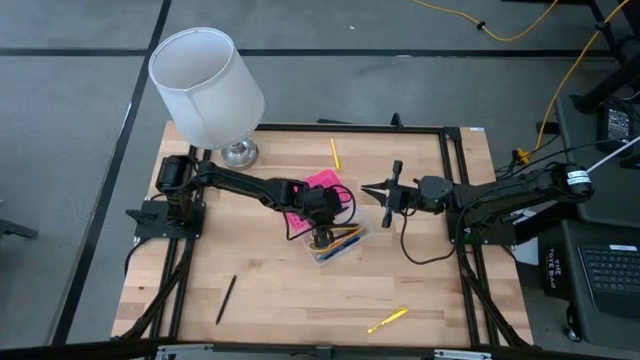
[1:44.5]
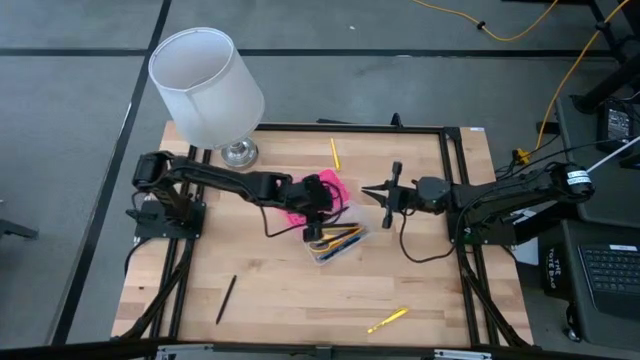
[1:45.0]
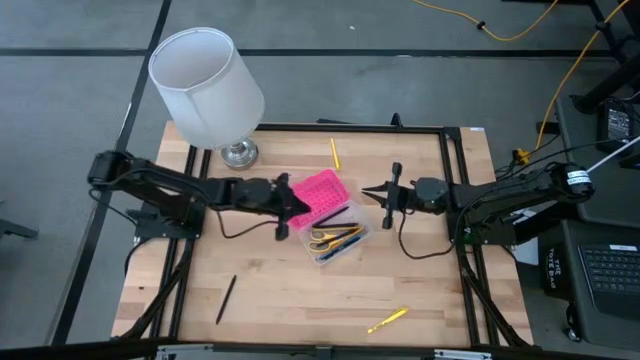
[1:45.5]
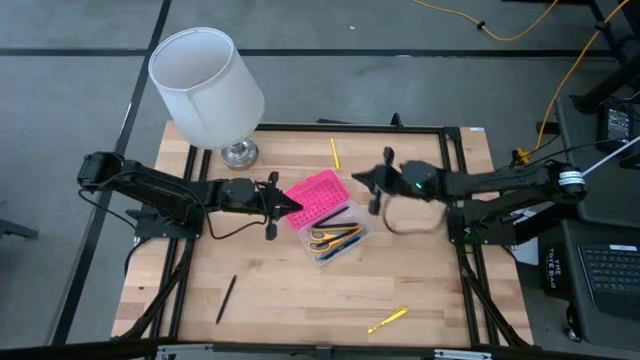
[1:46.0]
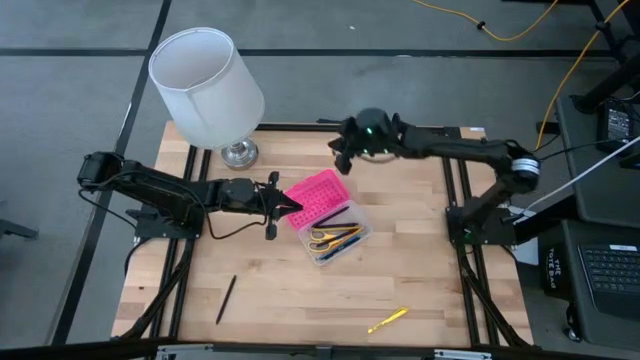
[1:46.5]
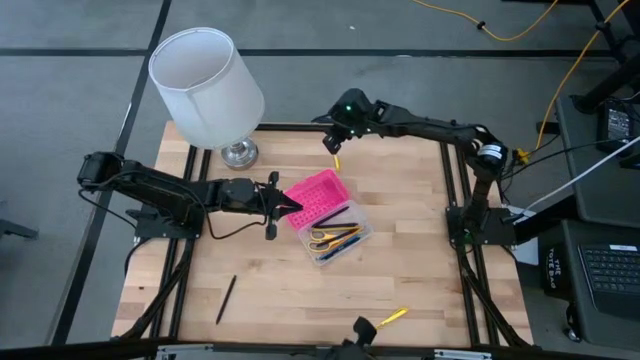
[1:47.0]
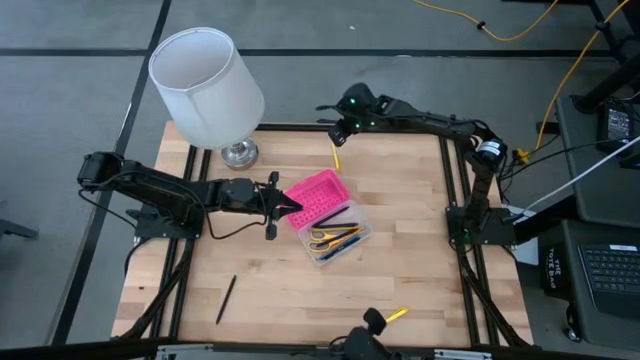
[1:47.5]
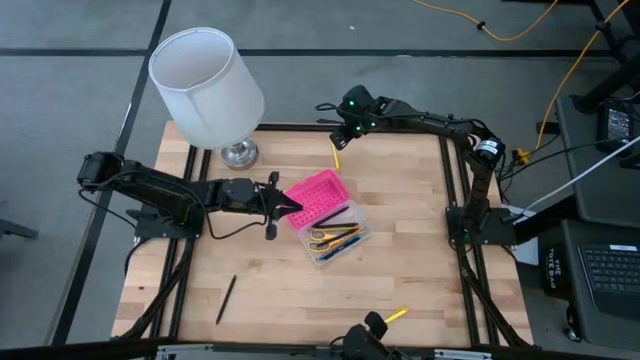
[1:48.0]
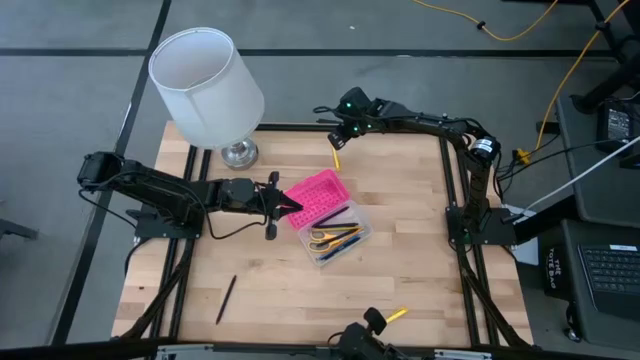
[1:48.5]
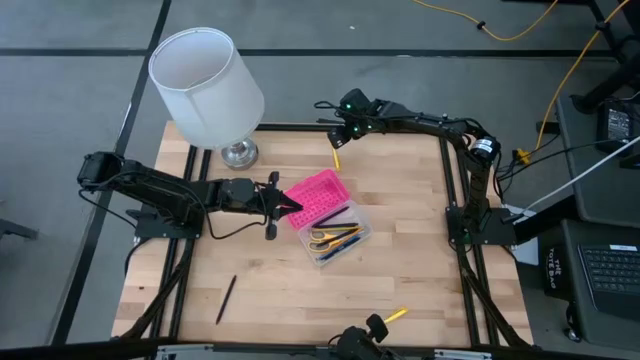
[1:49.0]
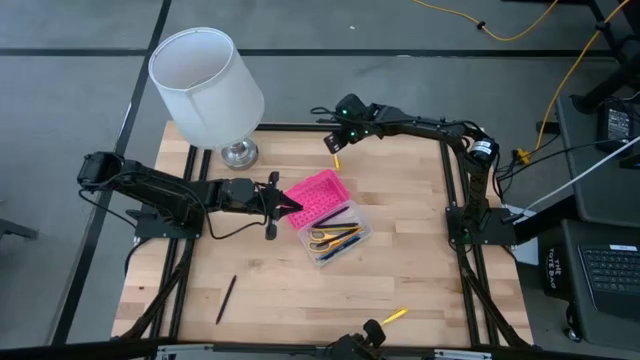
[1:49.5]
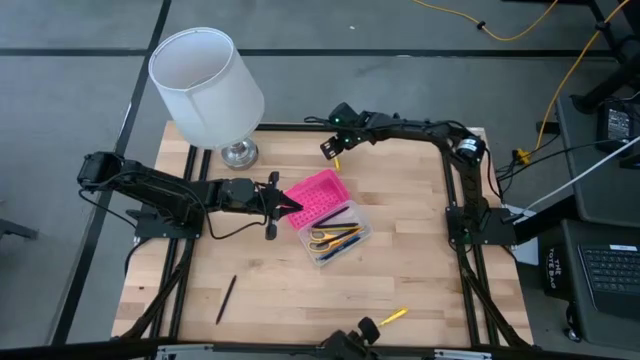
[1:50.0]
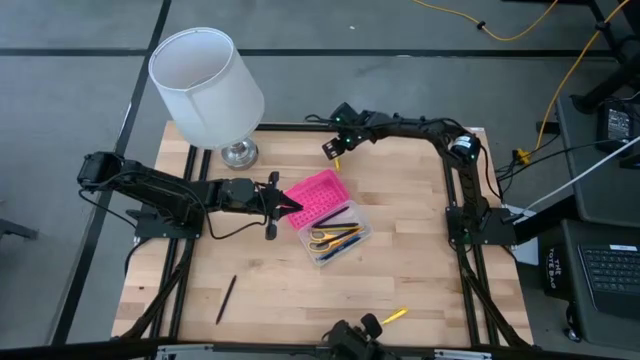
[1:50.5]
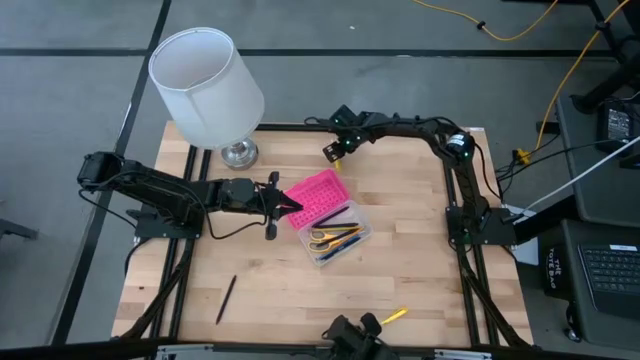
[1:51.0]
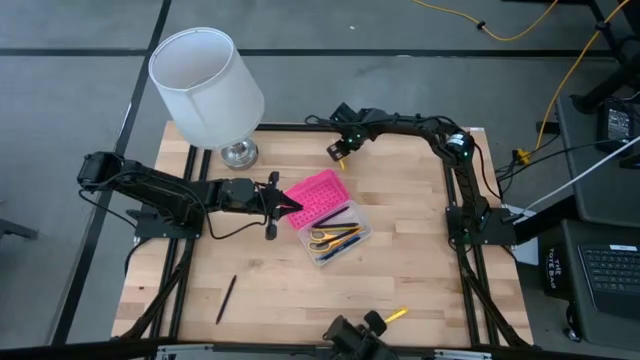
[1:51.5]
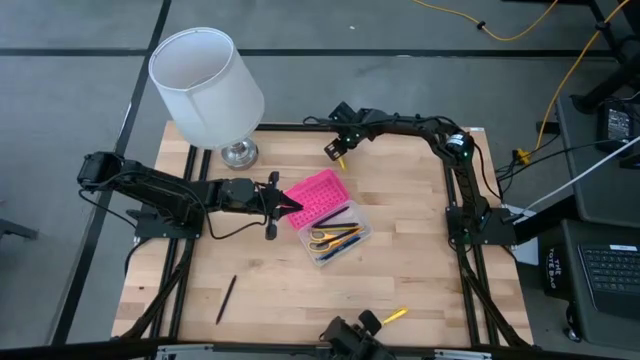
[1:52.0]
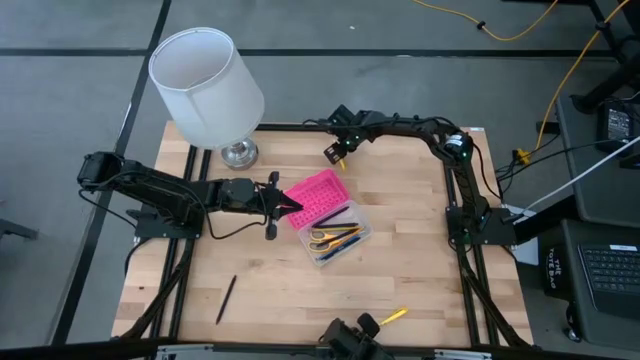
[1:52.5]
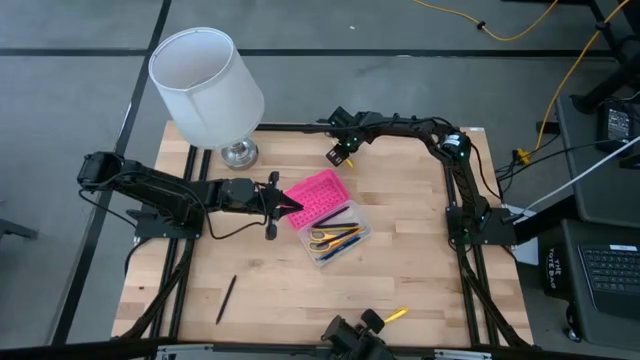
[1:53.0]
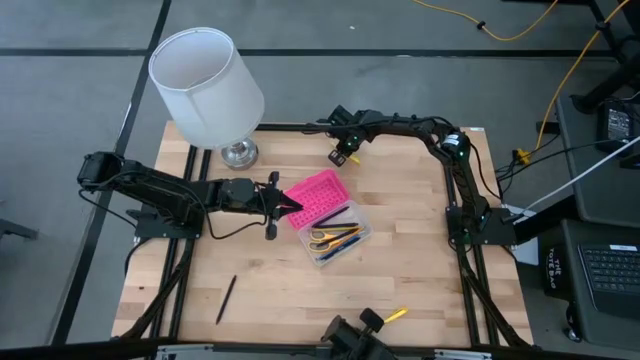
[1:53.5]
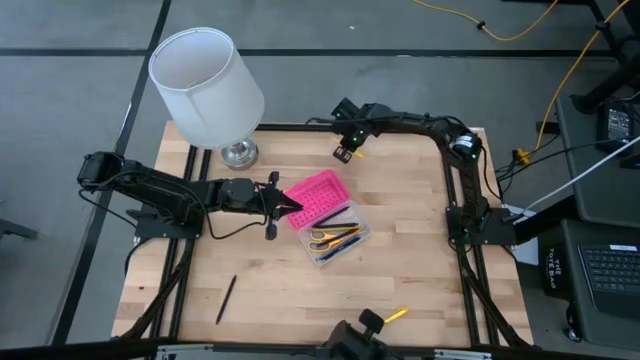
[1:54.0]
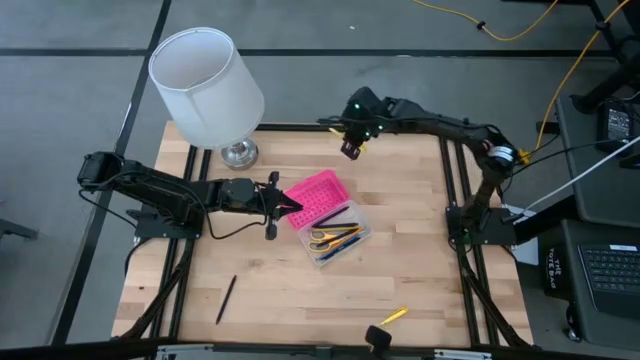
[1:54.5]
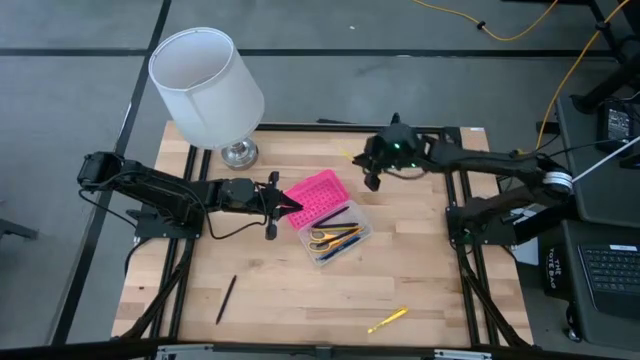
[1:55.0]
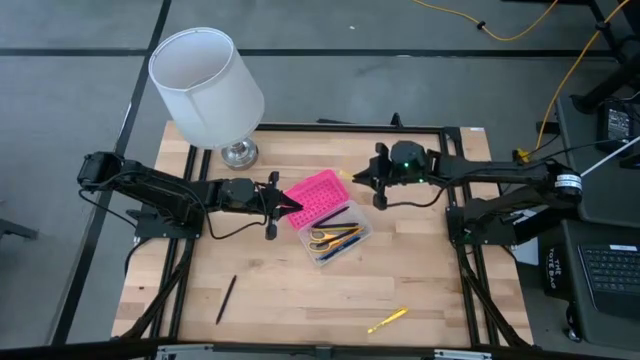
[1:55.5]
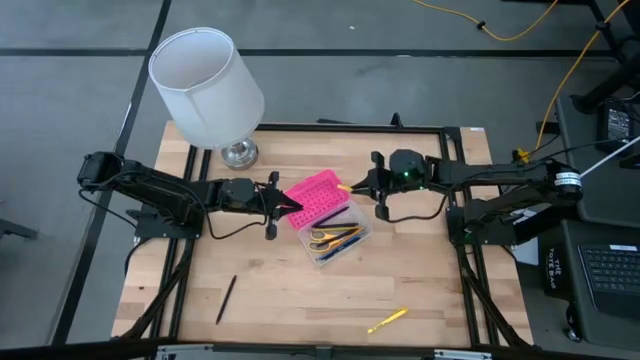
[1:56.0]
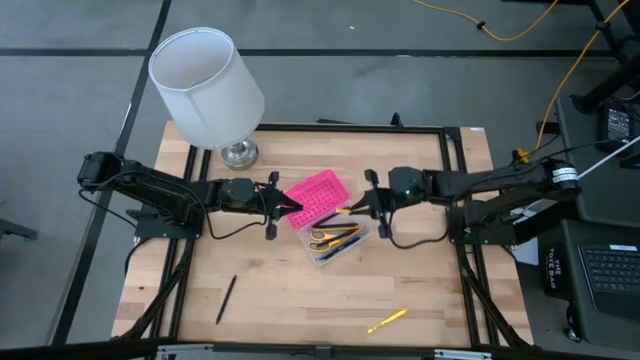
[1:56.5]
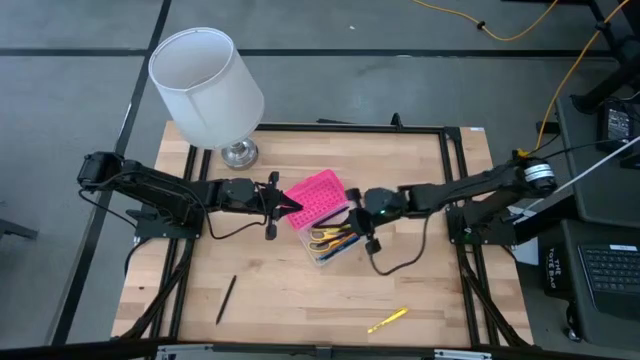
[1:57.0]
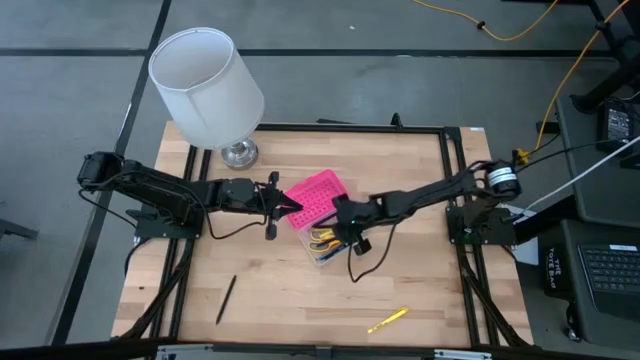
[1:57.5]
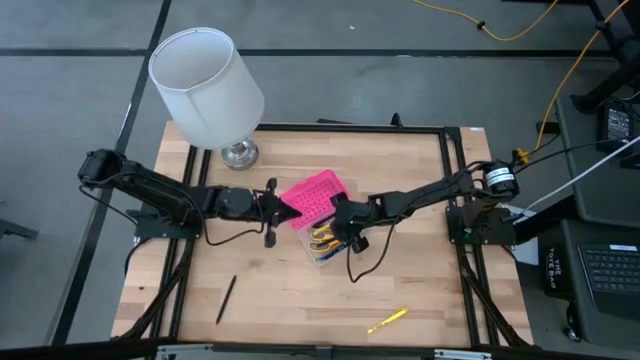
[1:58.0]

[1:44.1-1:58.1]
Task: Pick & place school supplies into a supply box
Put the yellow pen into the supply box

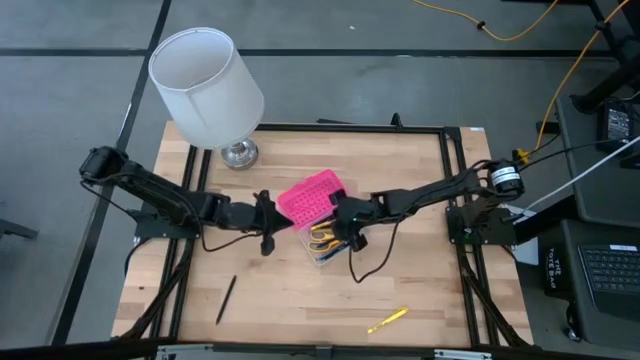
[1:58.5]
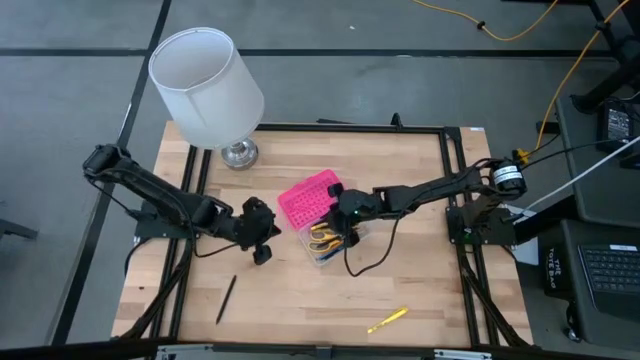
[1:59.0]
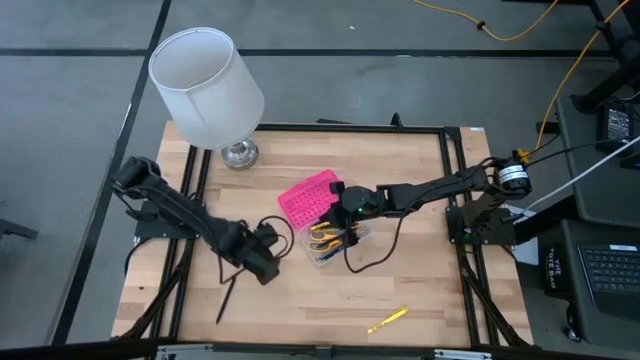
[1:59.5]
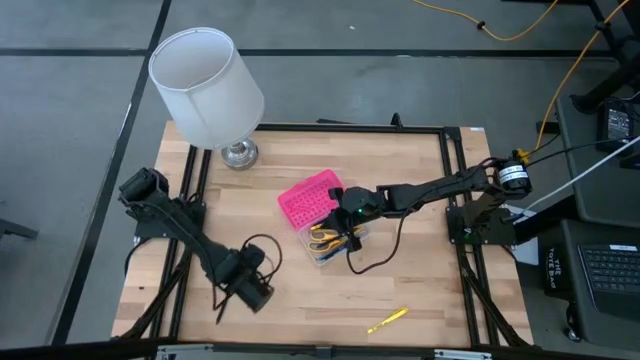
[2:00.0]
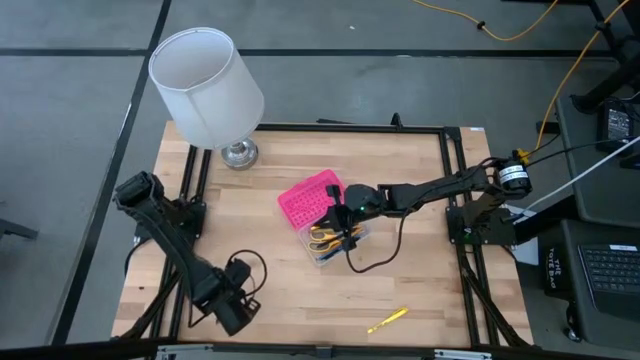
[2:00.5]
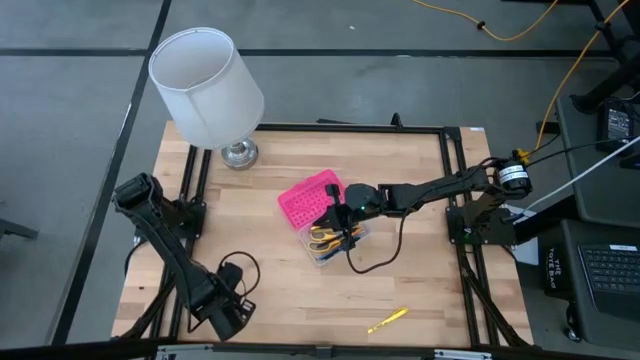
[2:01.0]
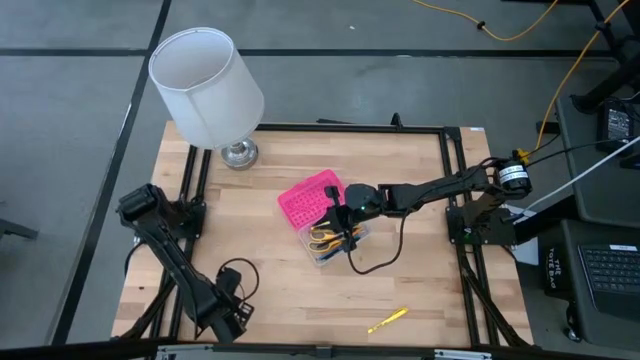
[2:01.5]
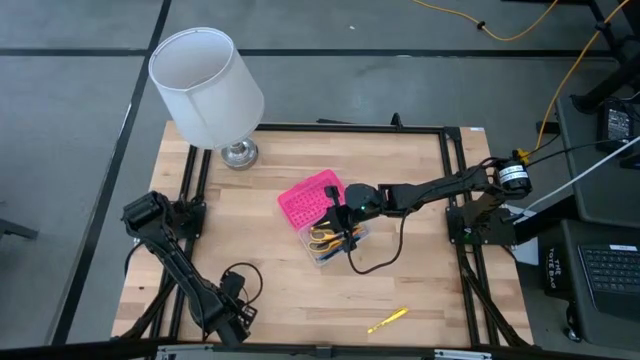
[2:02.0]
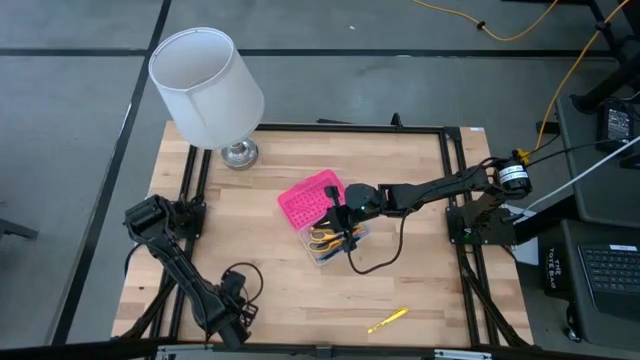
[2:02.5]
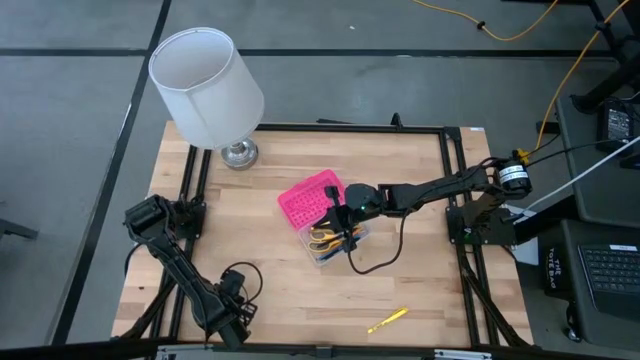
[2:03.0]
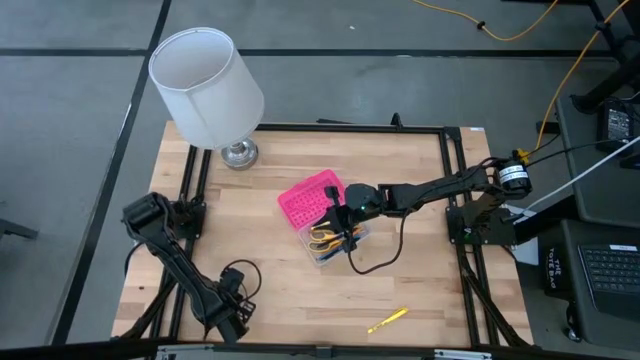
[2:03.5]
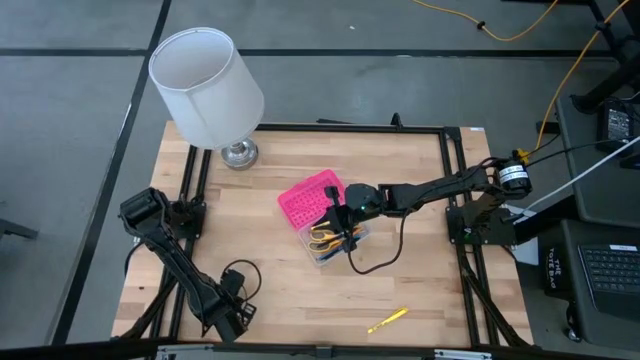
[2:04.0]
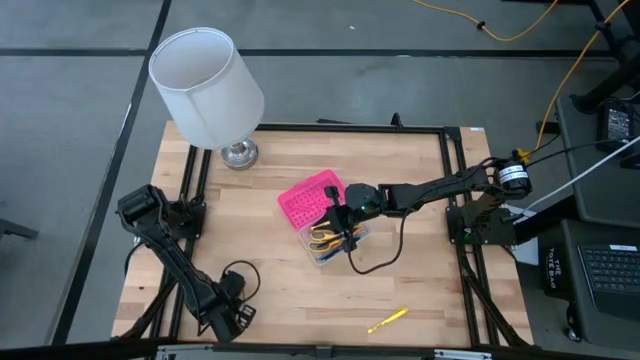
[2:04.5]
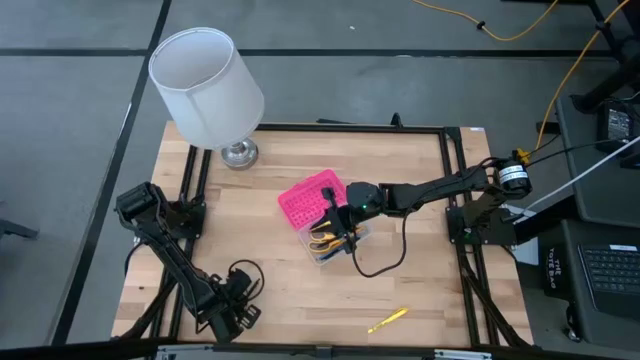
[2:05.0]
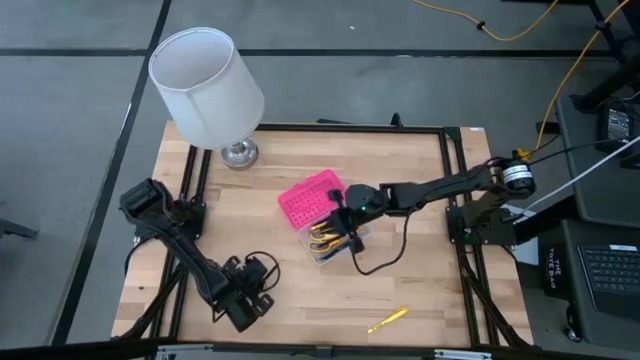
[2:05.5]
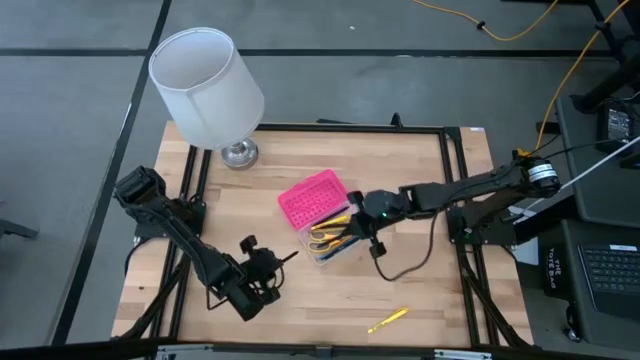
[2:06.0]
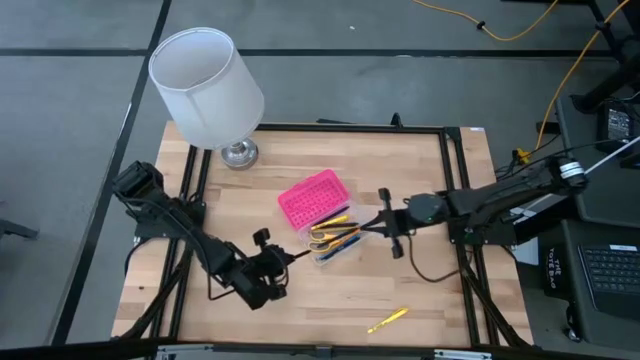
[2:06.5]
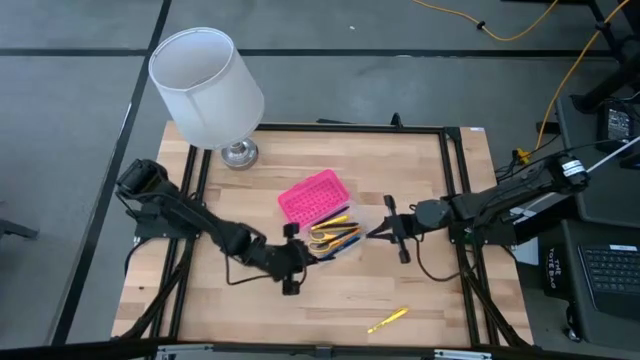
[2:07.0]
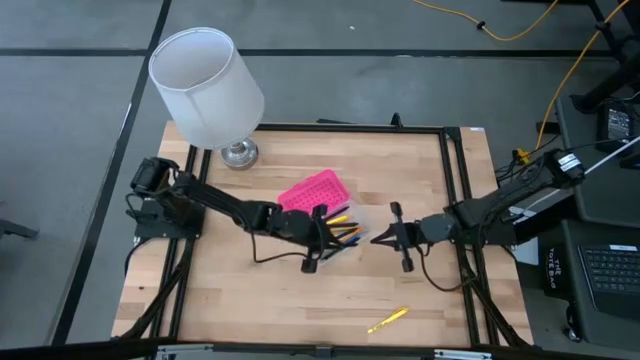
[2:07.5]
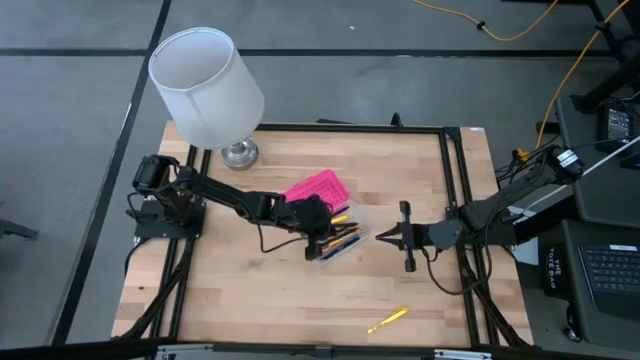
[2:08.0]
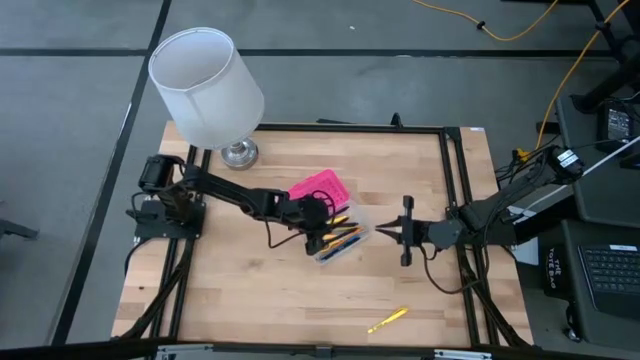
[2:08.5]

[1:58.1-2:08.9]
Put the black pen into the supply box
